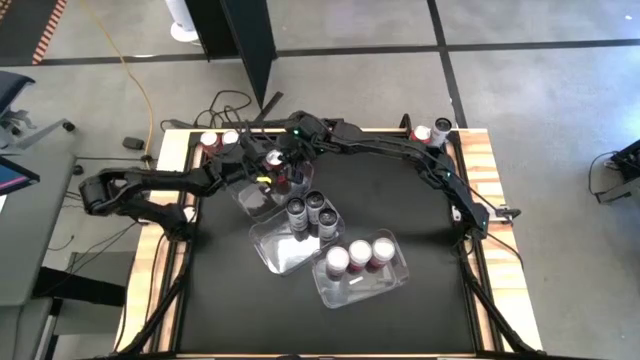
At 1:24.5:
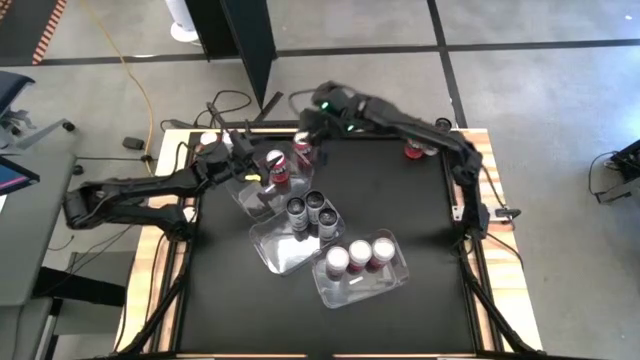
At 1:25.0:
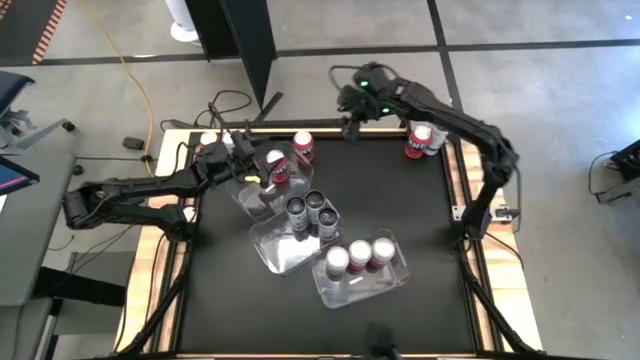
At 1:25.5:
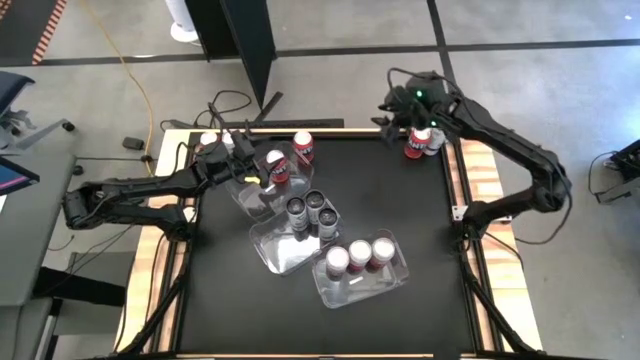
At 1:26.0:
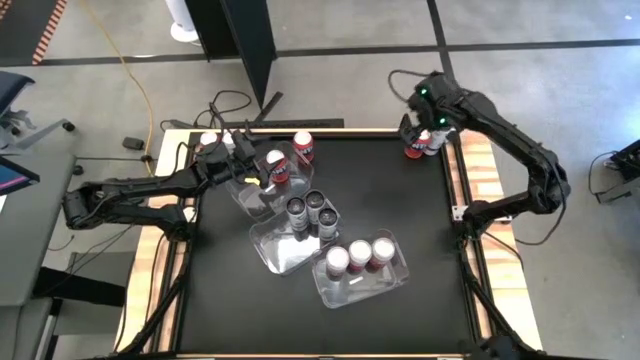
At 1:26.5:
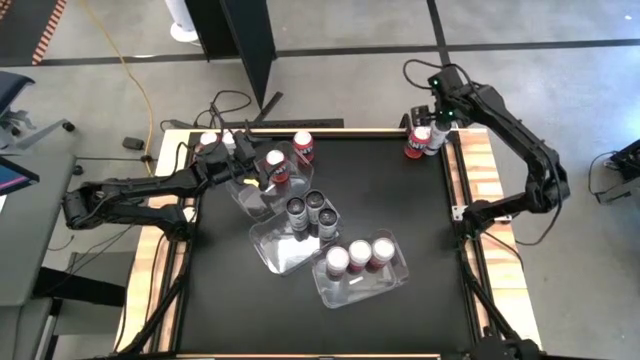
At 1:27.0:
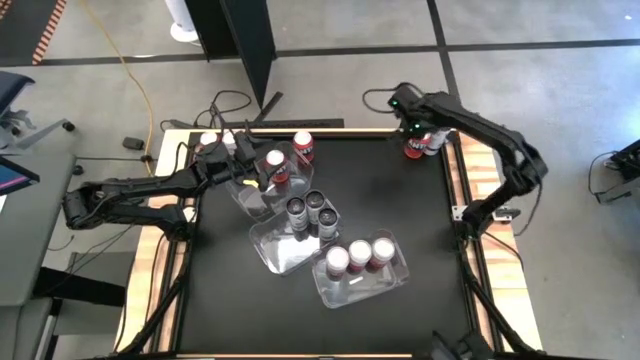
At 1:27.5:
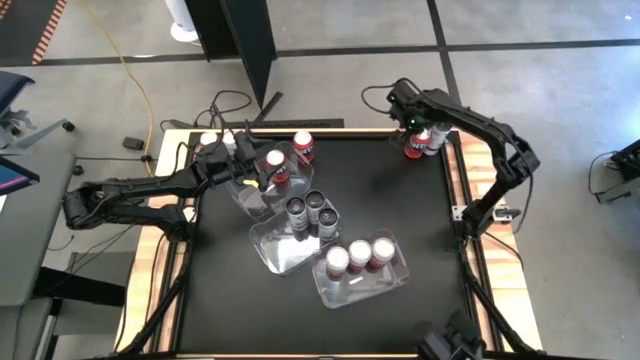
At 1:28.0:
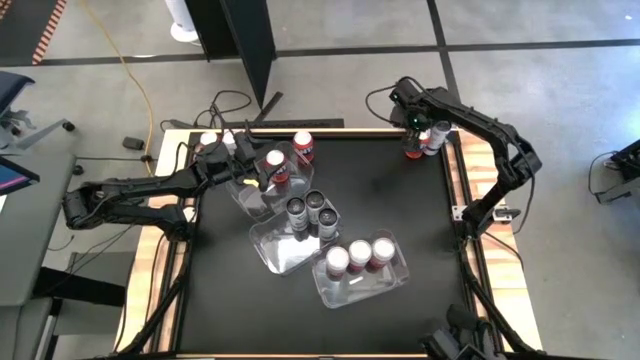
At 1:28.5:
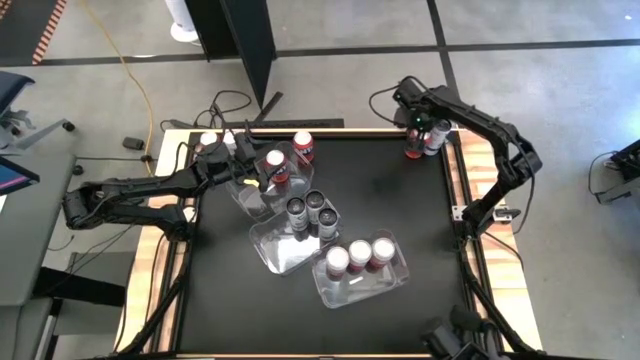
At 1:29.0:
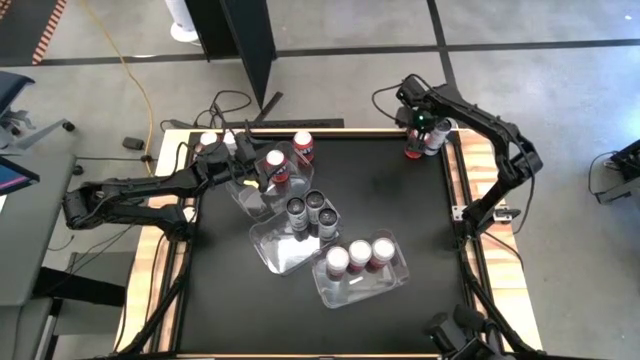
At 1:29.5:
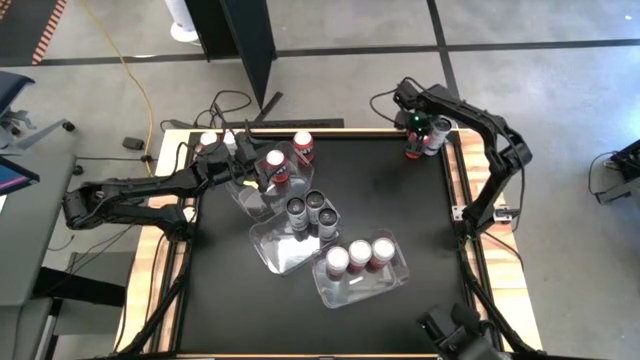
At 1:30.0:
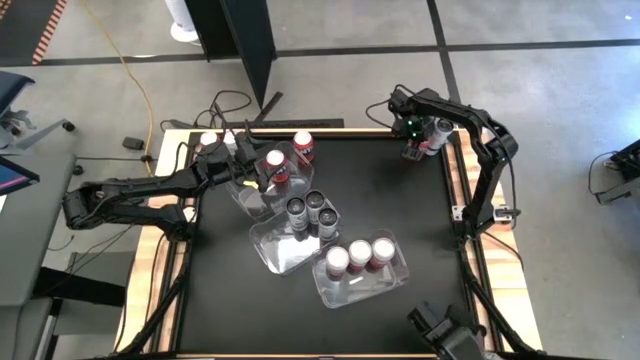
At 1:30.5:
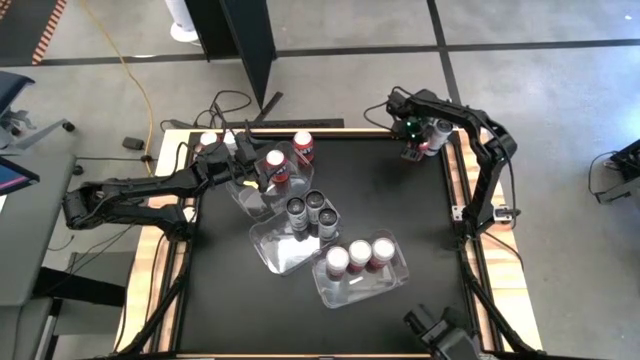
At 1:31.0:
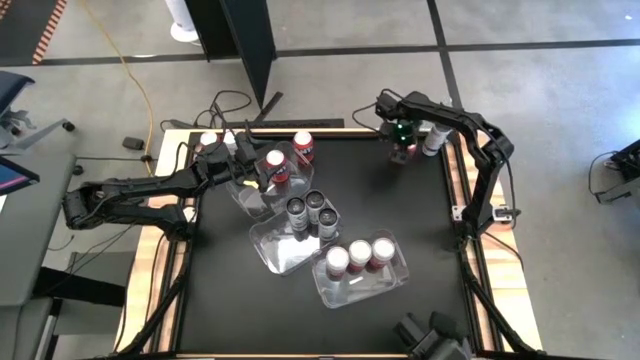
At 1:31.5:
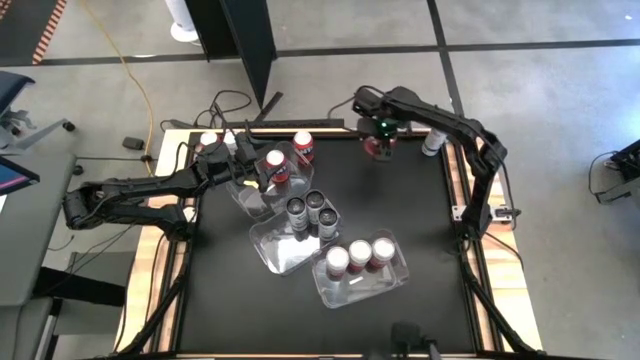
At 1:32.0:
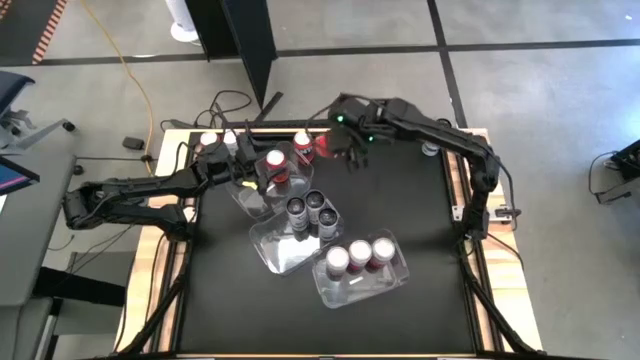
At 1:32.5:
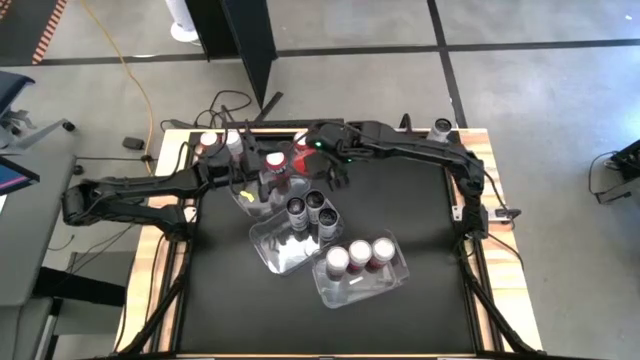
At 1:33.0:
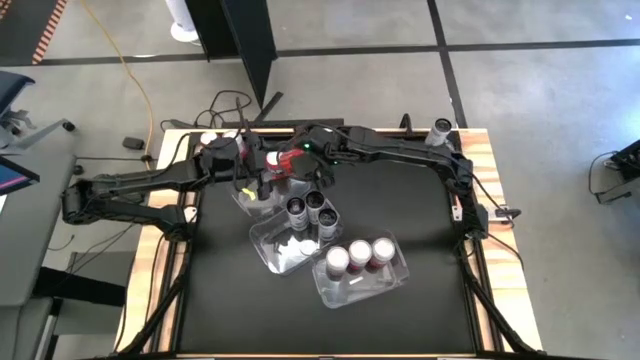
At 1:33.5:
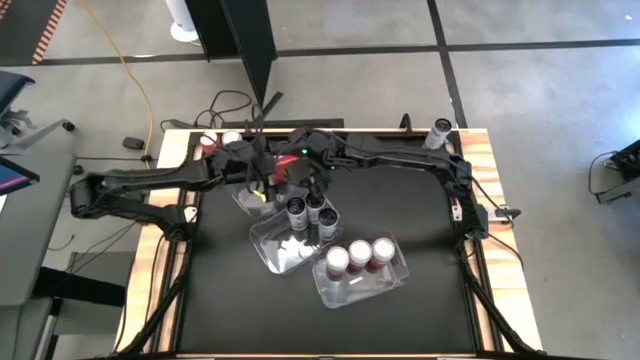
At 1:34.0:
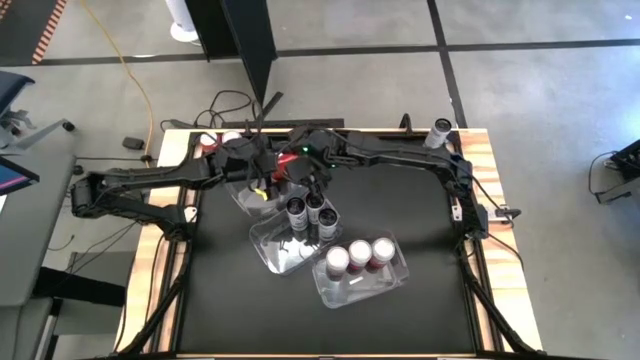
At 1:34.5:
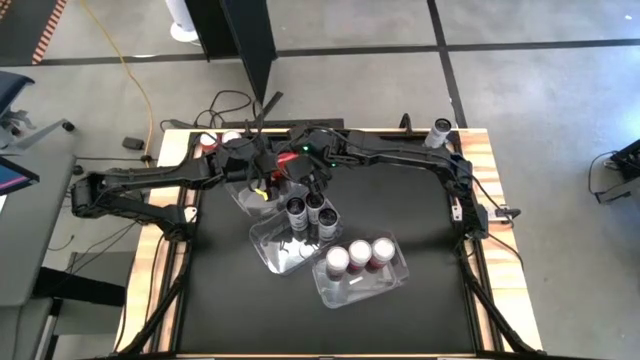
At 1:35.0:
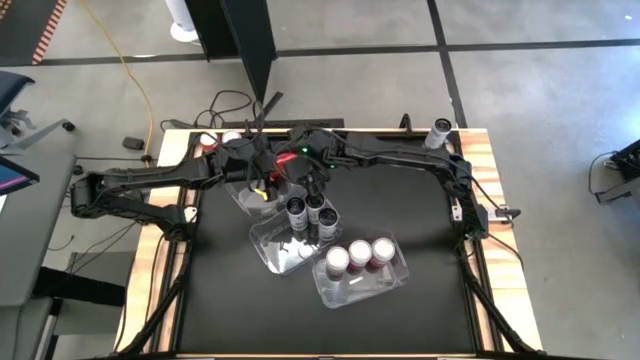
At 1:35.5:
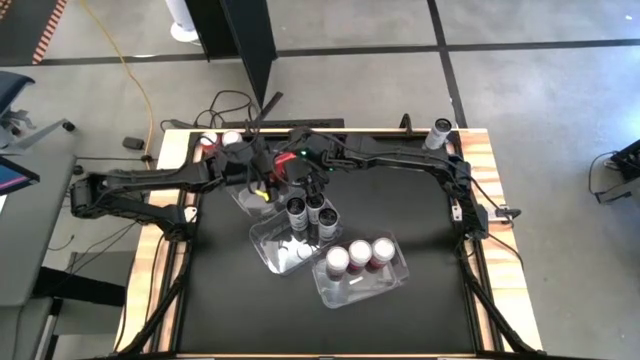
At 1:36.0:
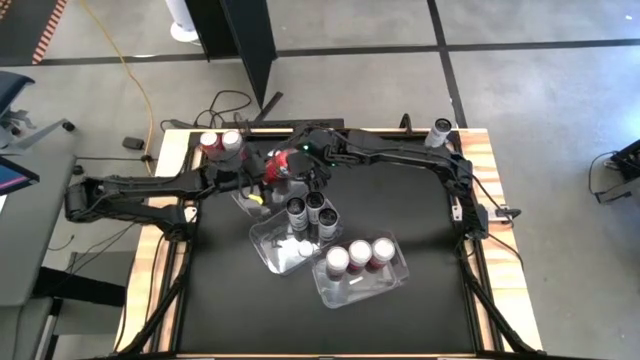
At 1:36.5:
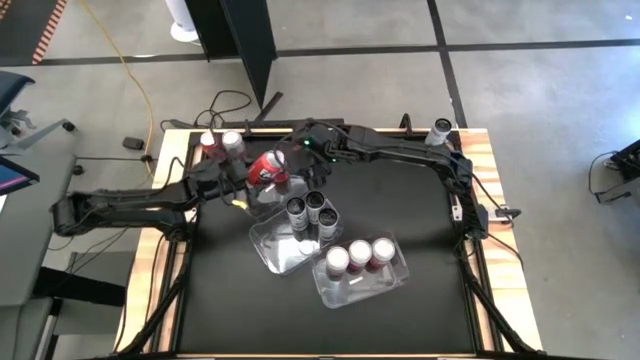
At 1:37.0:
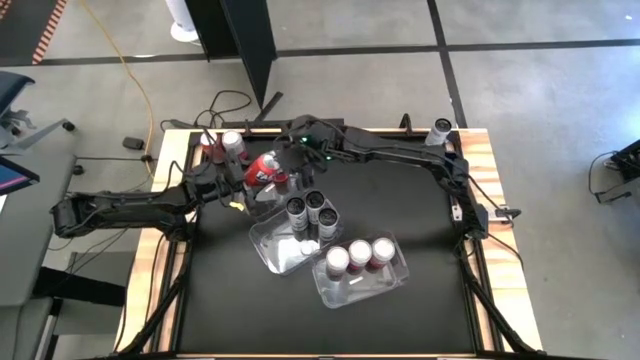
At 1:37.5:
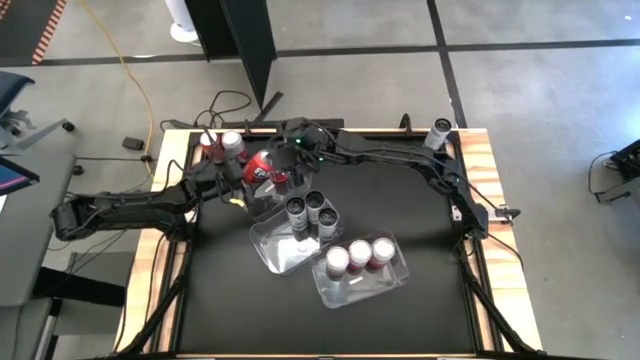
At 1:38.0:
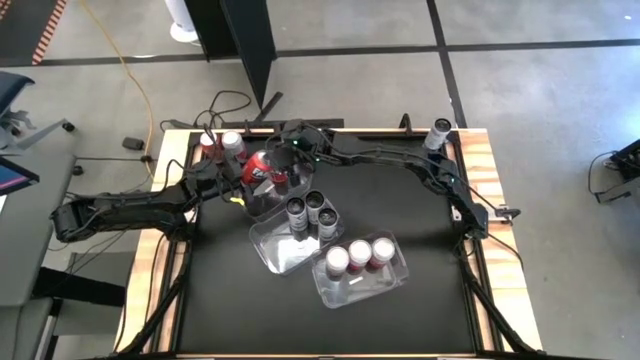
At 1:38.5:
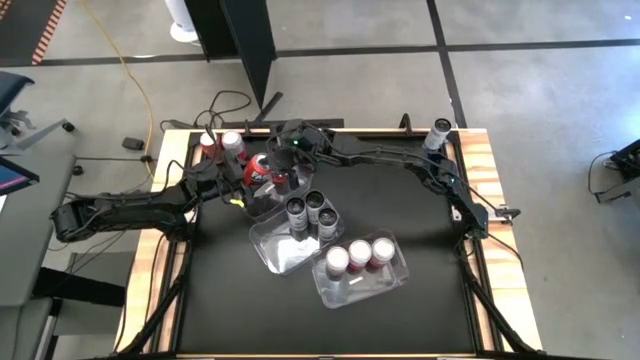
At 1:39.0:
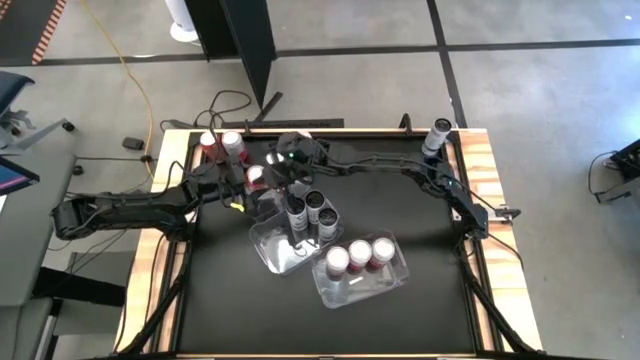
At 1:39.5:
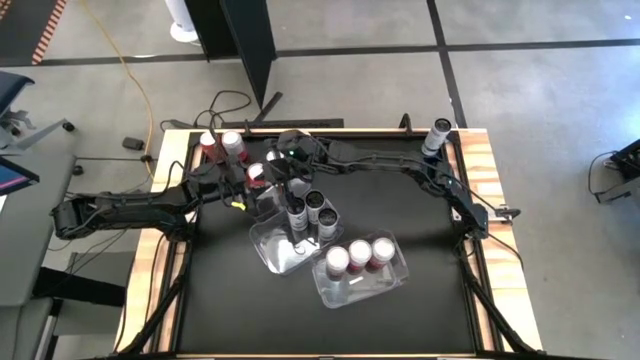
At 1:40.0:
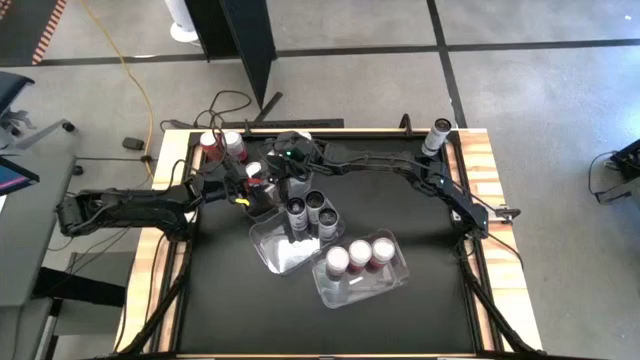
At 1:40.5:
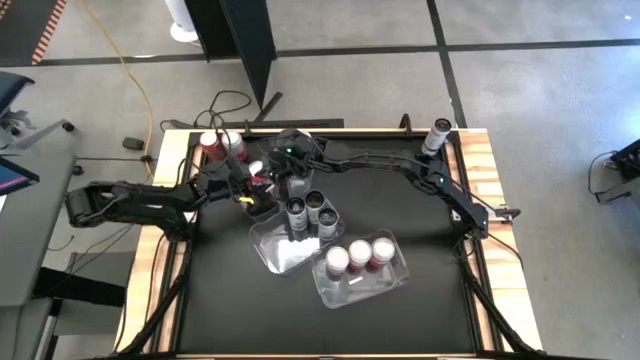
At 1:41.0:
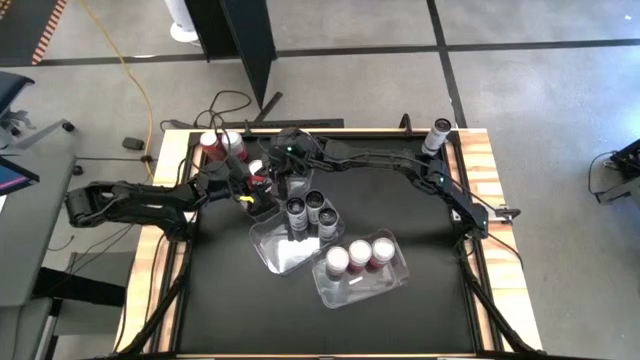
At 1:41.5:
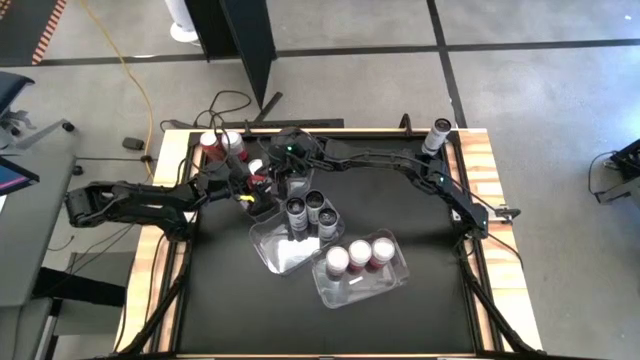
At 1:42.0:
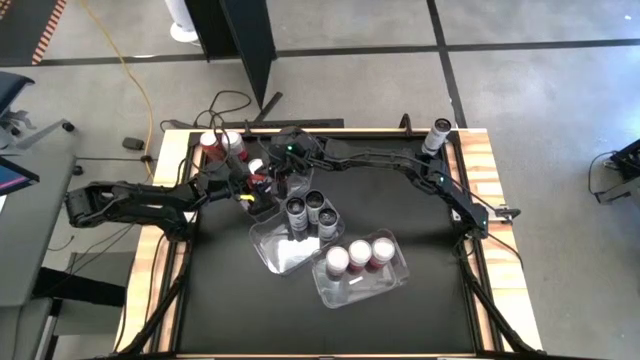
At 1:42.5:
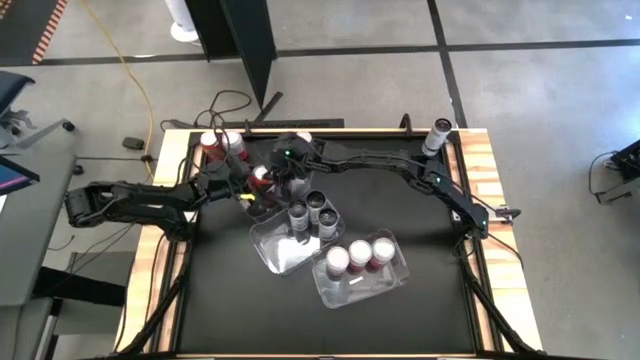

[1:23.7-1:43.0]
Task: Sort soda cans
Put the top right orange soda can in the top left transparent bin

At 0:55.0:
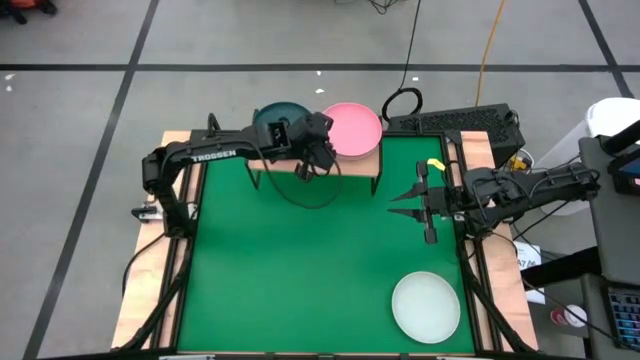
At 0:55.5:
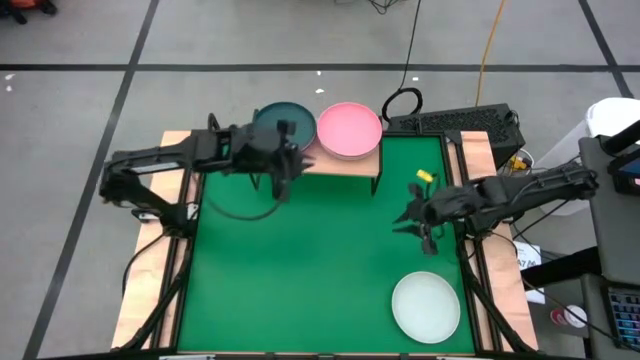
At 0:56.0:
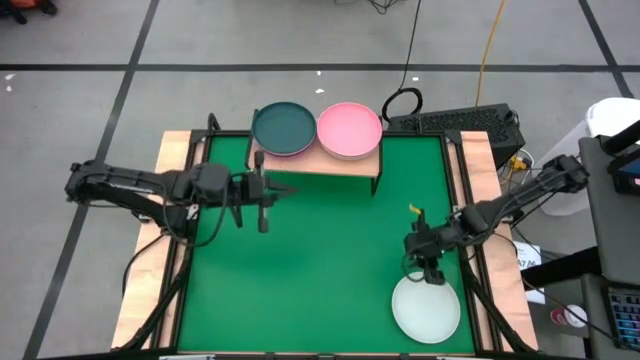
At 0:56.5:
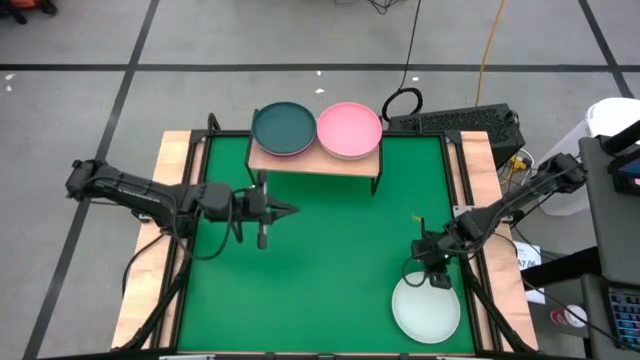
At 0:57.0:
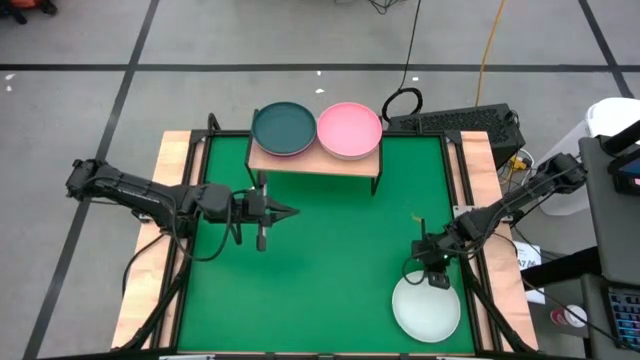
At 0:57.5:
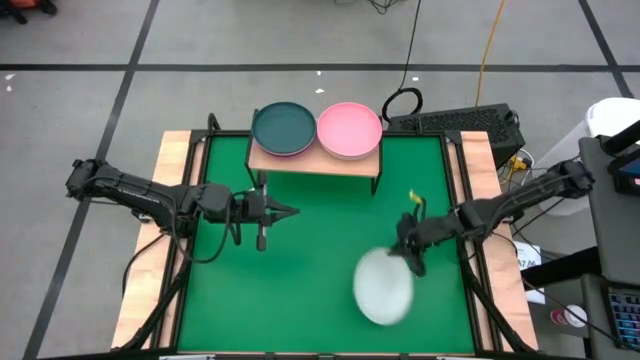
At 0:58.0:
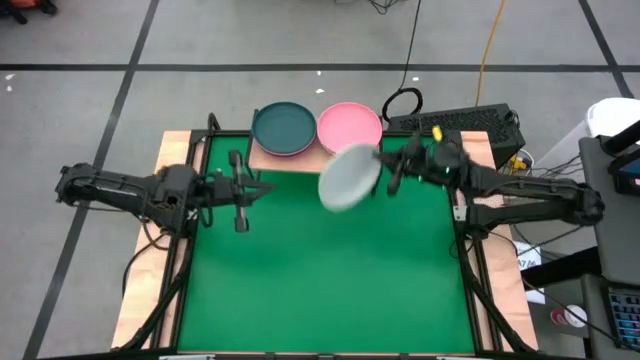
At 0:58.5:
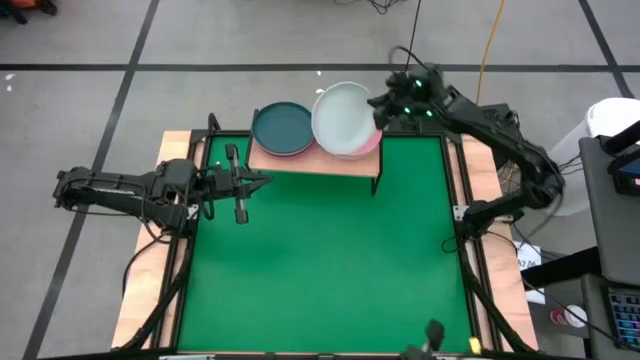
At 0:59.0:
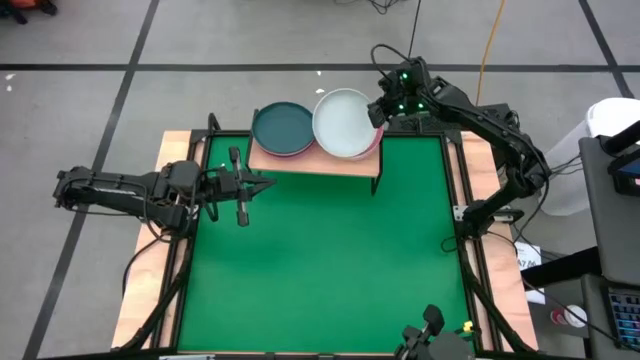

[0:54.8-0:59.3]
Task: Place and stack plates onto a shelf
Stack the blue plate on top of the light pink plate on the shelf
